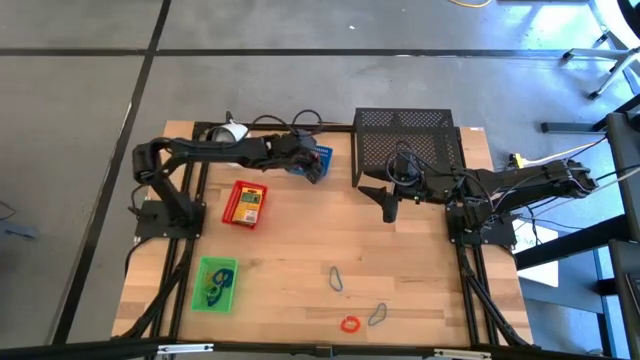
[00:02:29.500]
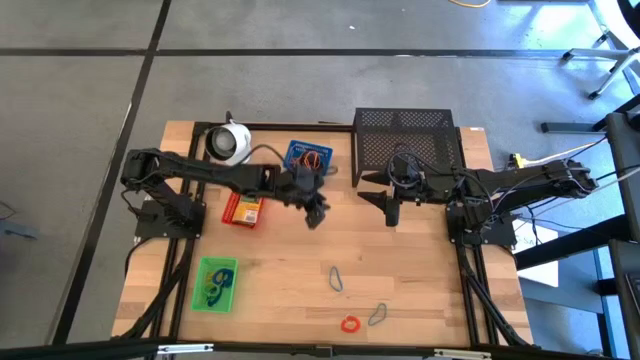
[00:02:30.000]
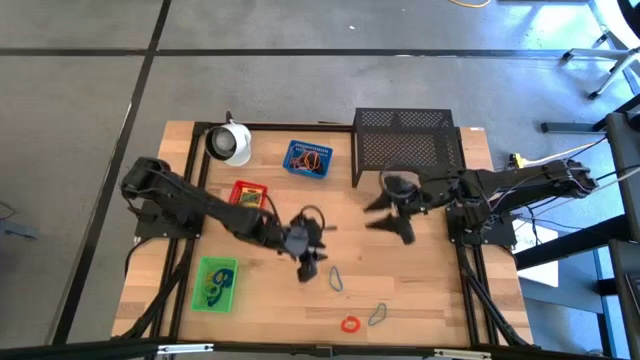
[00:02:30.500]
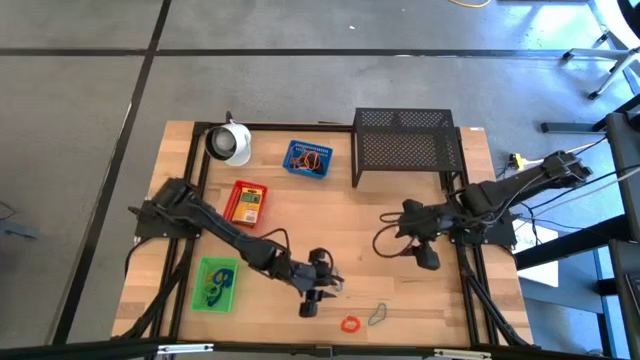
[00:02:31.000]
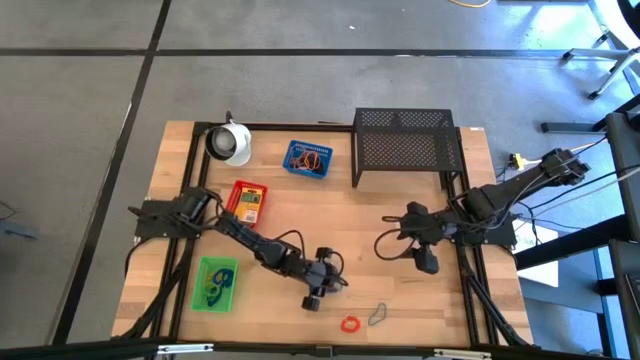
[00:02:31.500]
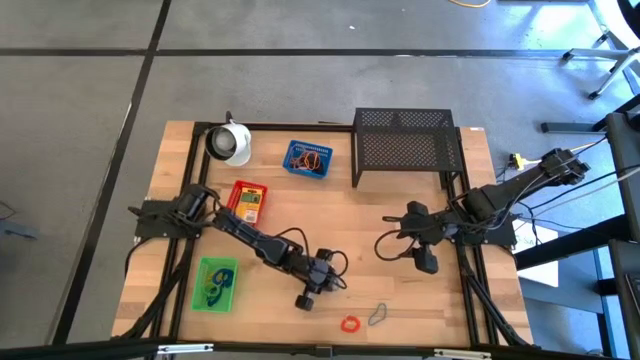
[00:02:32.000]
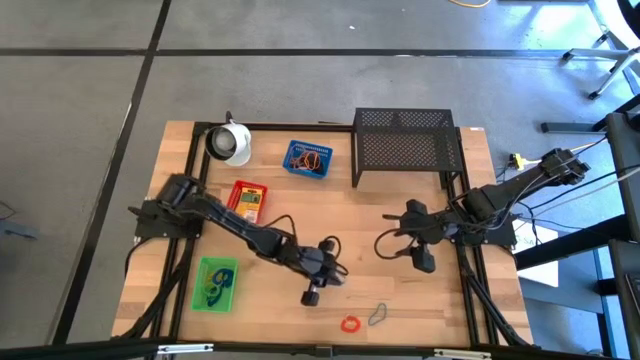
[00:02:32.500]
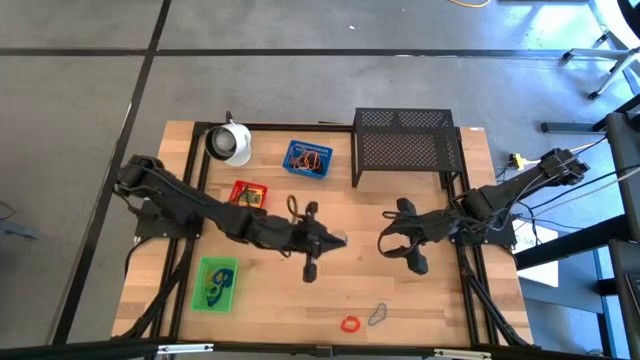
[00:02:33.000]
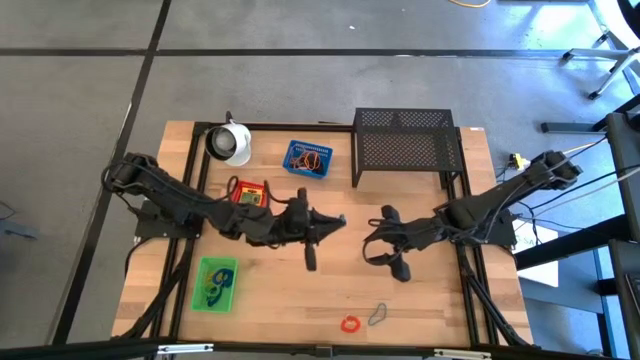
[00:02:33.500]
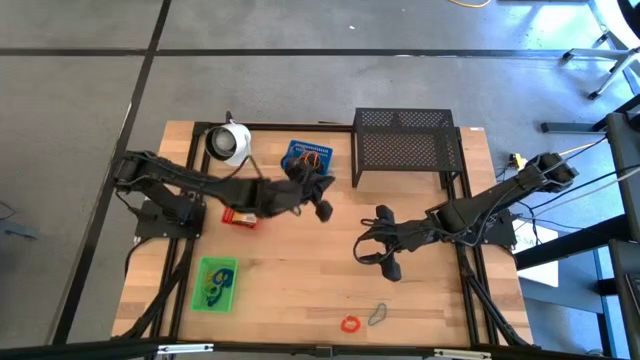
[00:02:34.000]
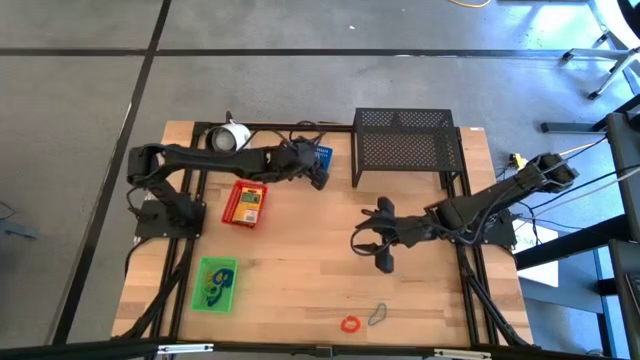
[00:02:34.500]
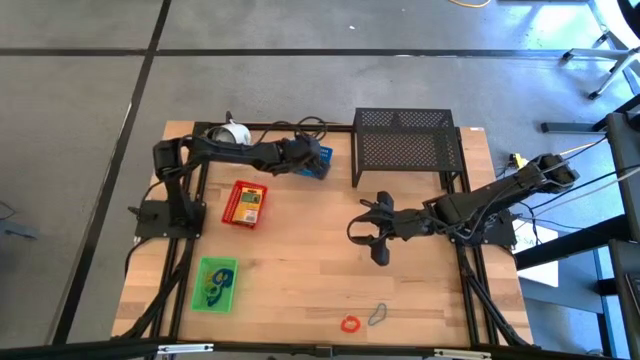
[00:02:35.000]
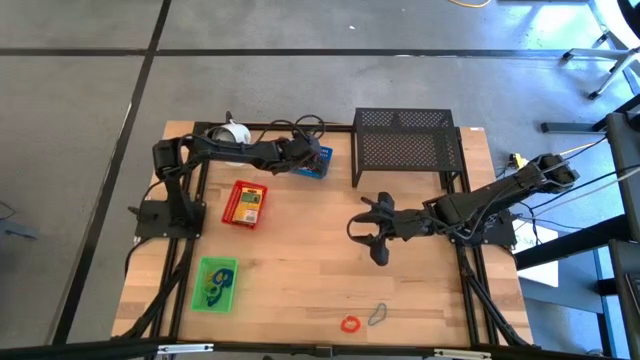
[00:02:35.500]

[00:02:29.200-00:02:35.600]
Task: Pick & Place Office Desk Supplies
Put the blue rubber band into the blue bin

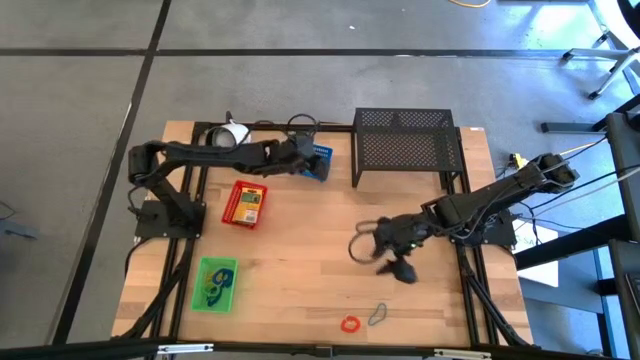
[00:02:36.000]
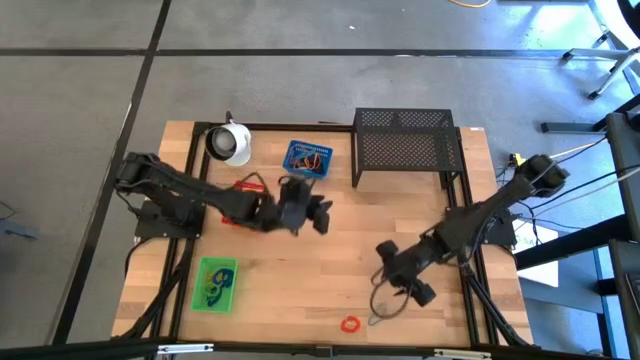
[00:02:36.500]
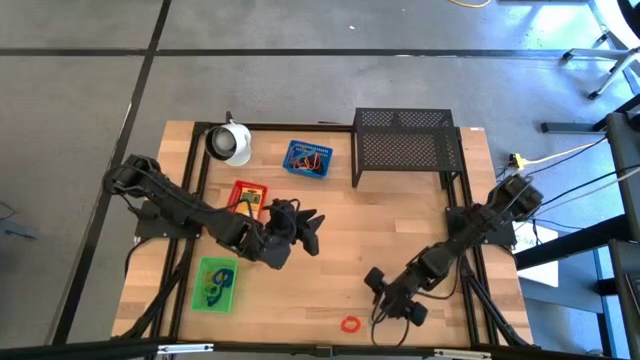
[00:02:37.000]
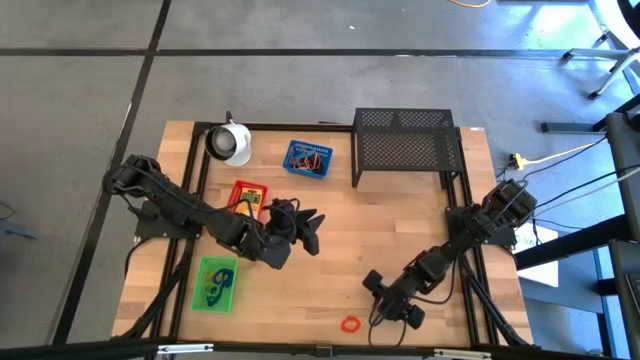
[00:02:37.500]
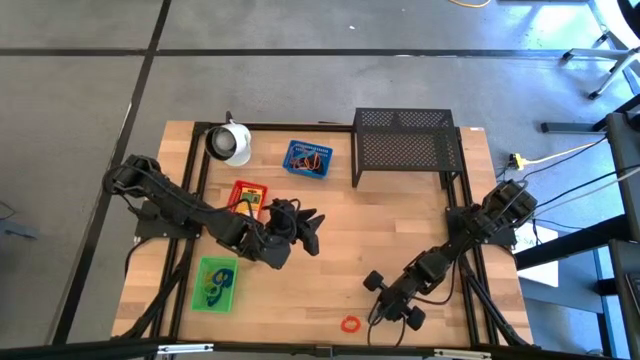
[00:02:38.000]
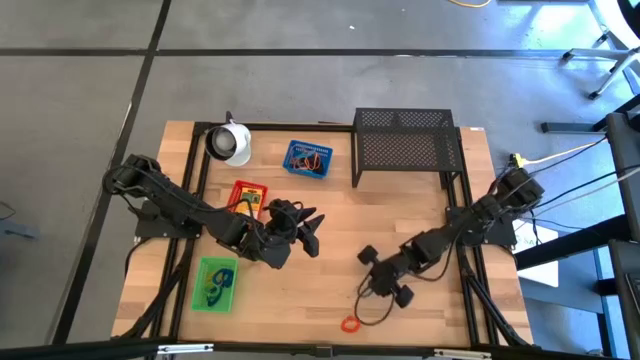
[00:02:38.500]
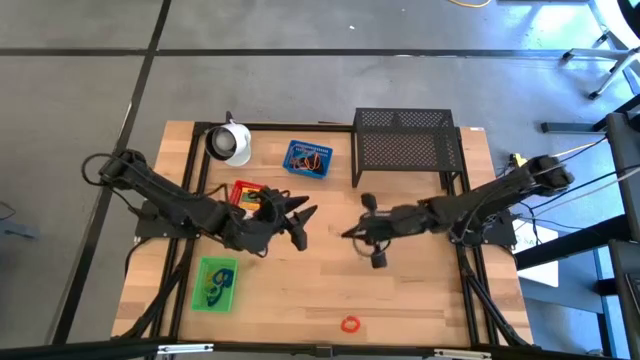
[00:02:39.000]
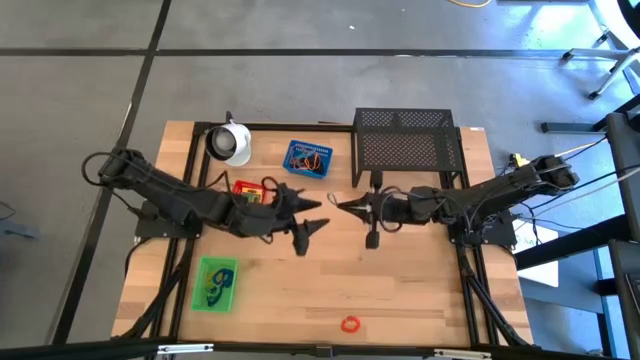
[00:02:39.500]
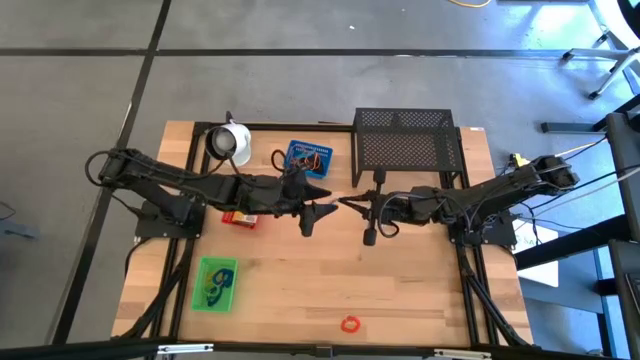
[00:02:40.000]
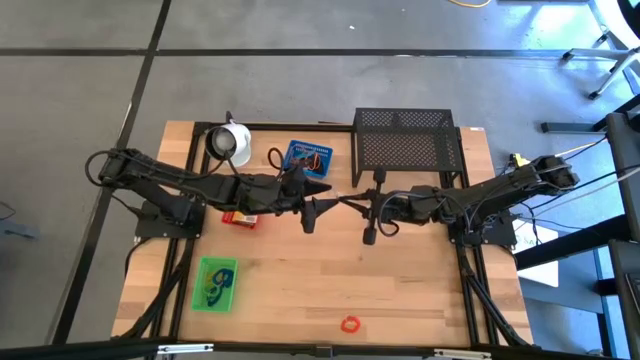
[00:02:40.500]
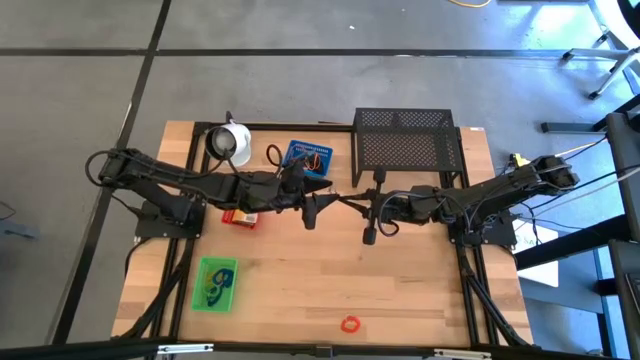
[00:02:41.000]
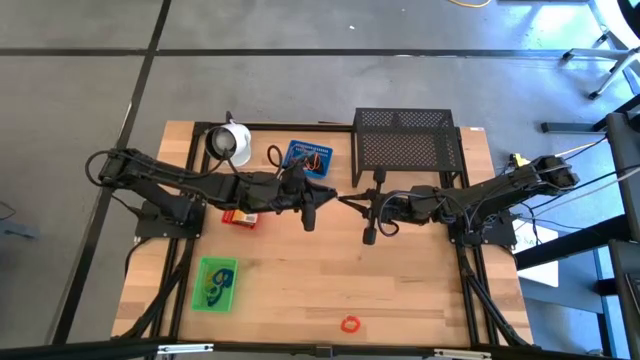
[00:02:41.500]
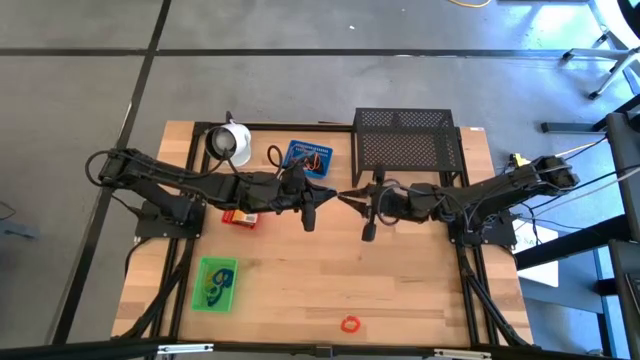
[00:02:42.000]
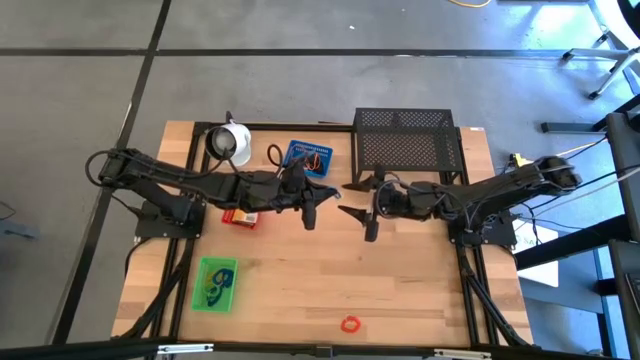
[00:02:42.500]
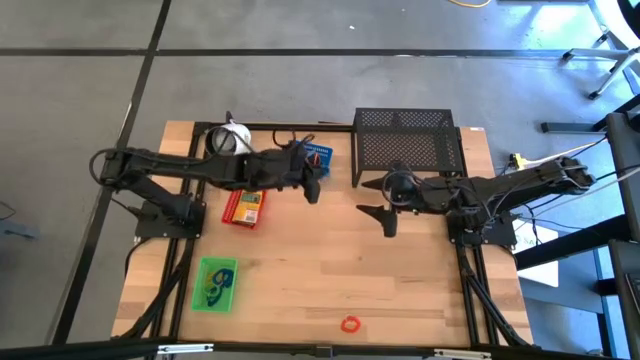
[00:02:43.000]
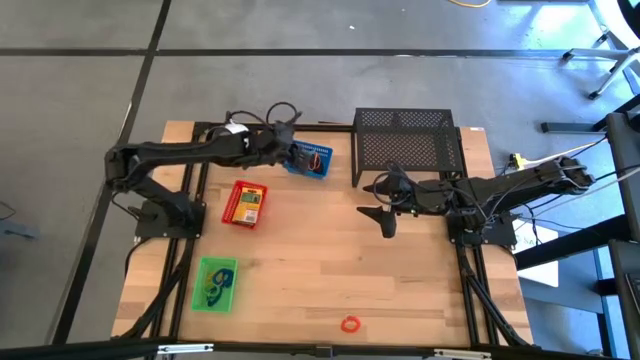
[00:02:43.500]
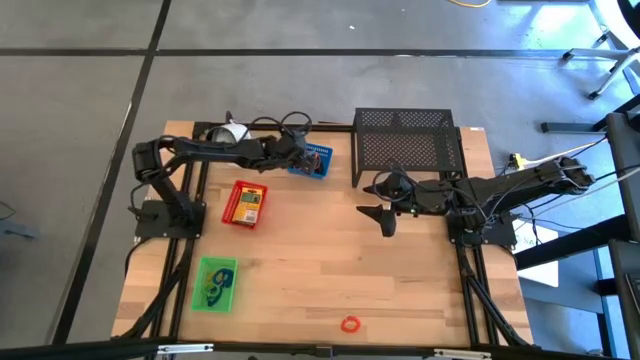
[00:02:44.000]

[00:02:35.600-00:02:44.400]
Put the blue rubber band into the blue bin

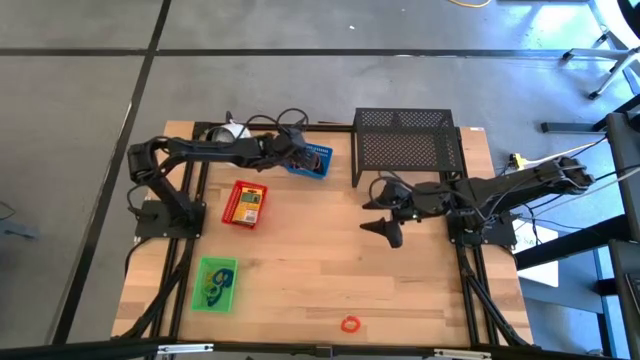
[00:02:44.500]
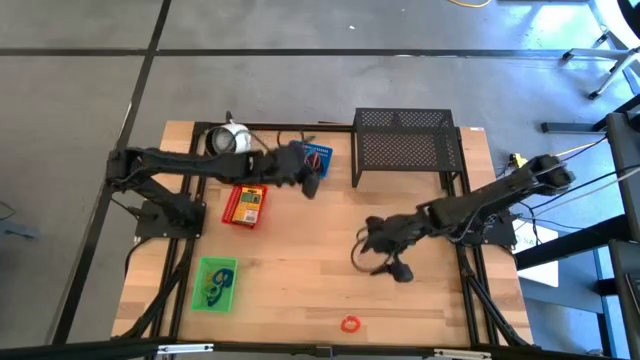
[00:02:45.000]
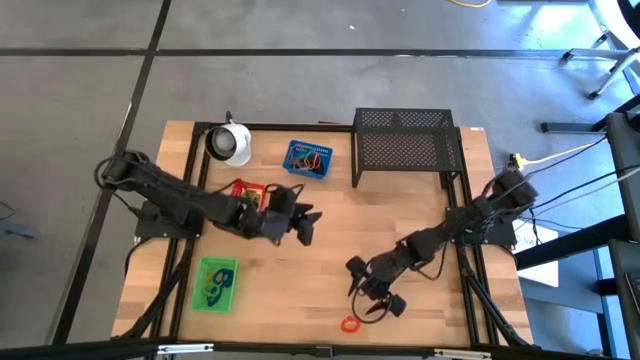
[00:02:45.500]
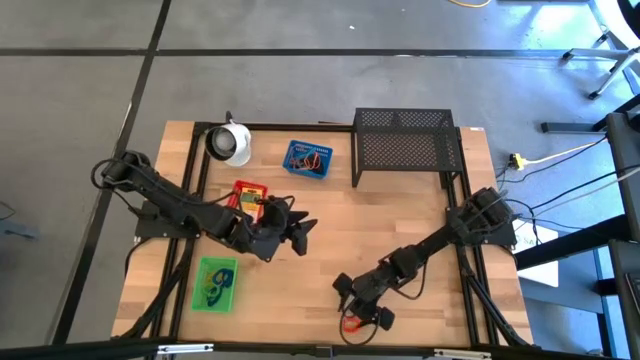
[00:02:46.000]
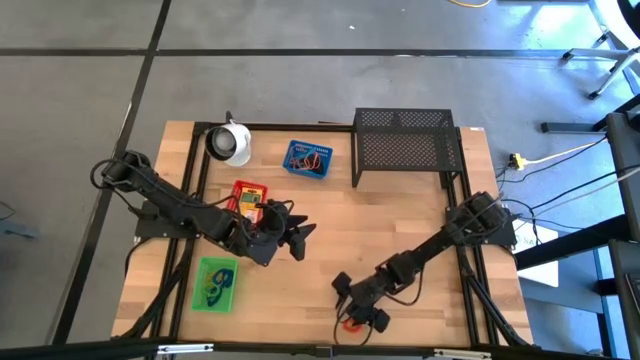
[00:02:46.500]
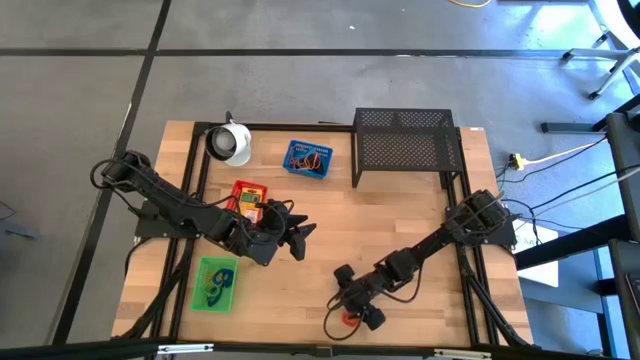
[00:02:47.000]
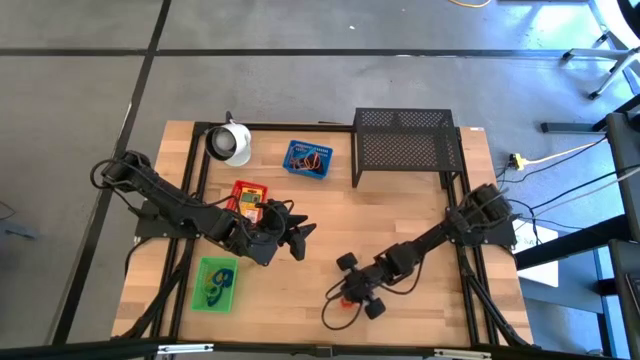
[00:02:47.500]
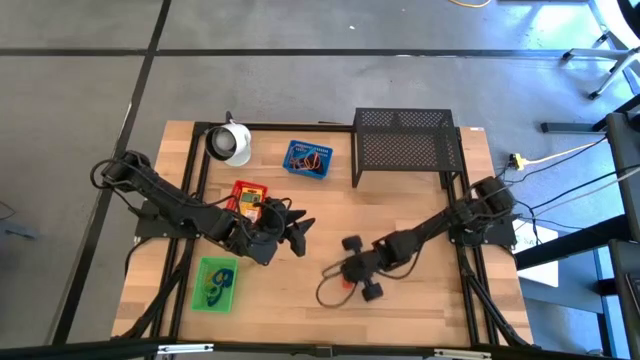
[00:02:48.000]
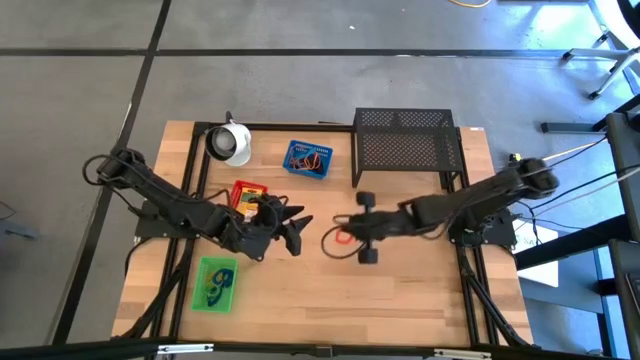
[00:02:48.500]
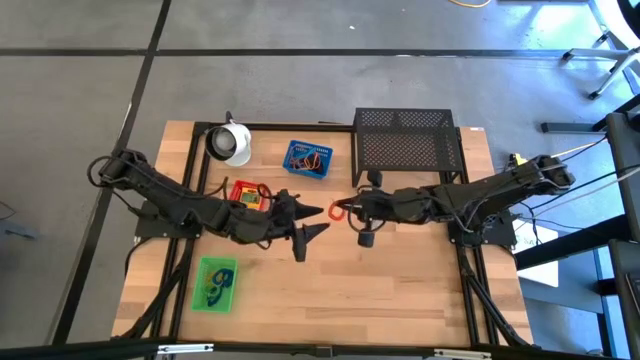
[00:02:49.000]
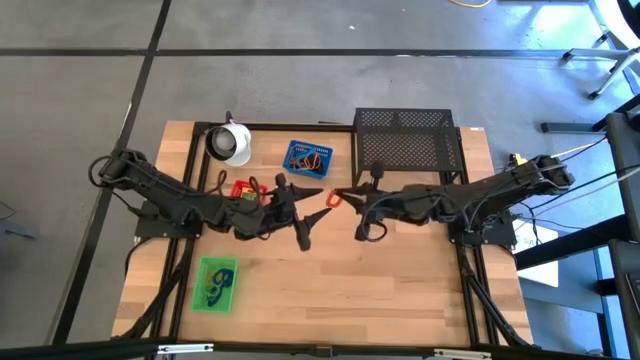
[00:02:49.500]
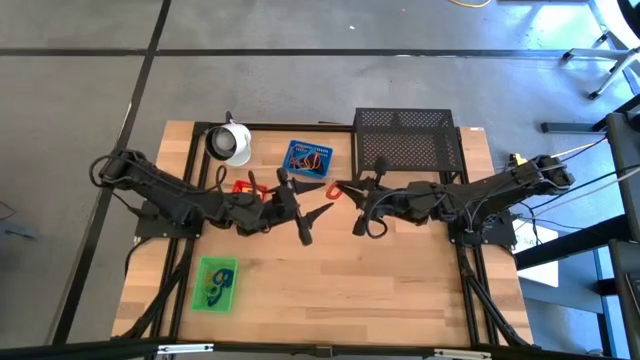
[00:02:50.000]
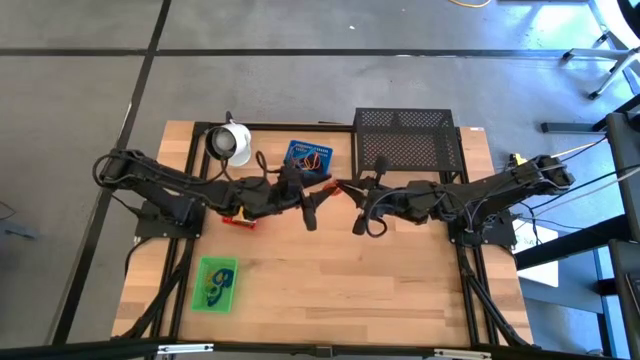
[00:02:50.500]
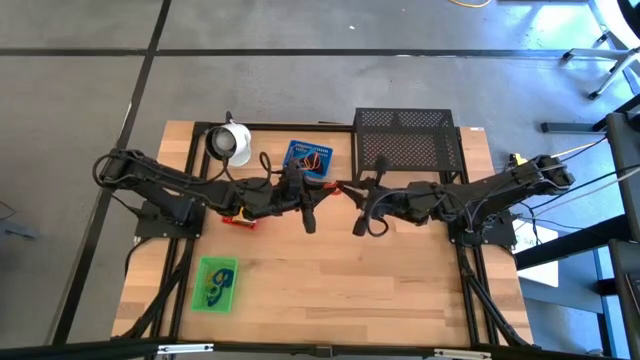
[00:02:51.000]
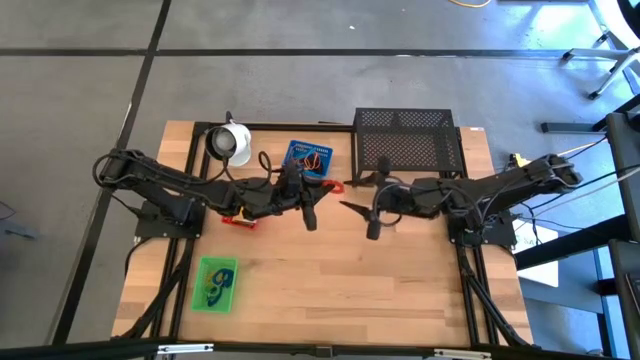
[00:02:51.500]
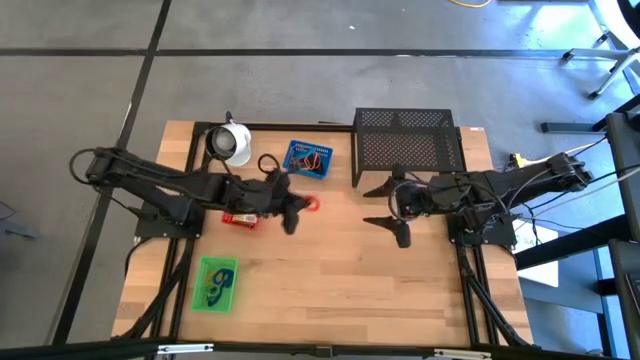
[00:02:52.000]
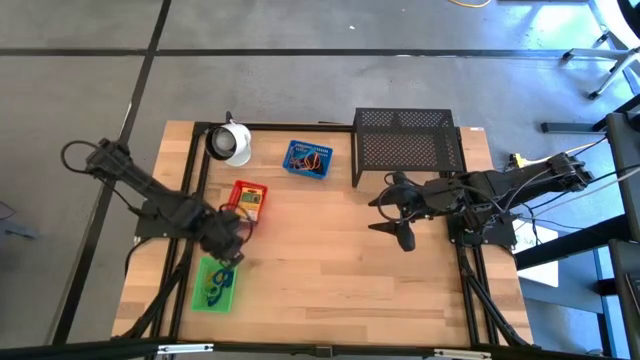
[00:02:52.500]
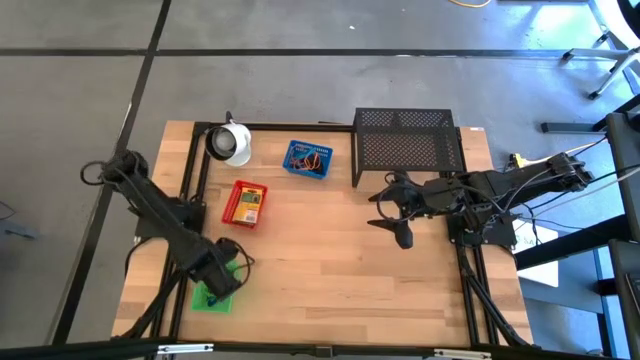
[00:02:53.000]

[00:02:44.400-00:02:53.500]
Put the orange spring keychain into the green bin
